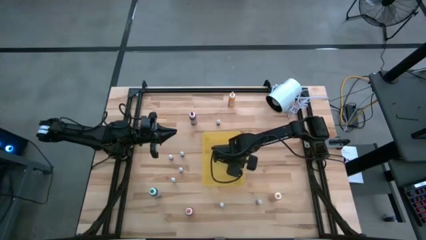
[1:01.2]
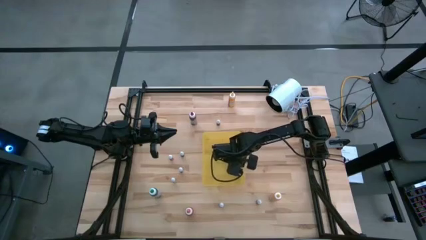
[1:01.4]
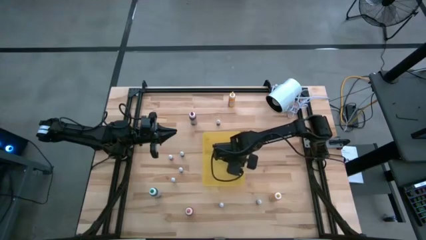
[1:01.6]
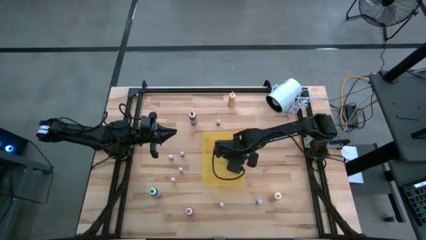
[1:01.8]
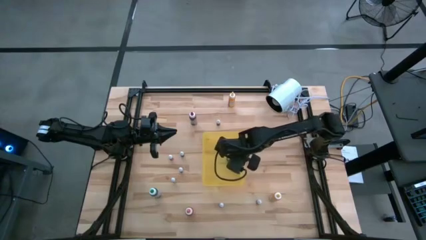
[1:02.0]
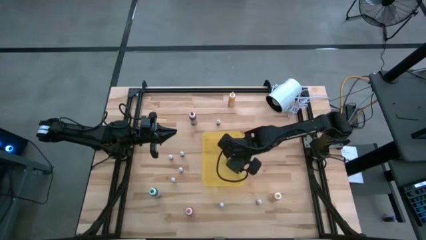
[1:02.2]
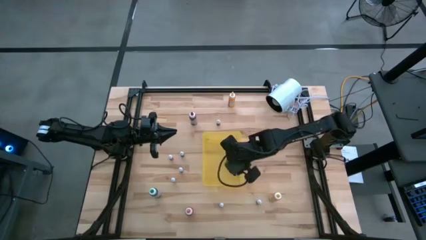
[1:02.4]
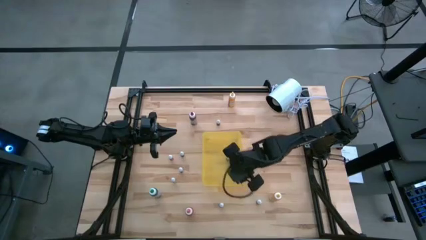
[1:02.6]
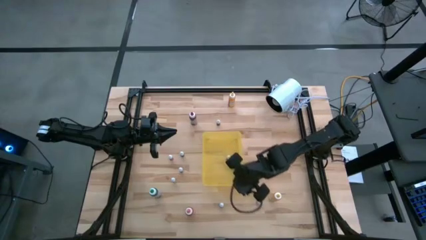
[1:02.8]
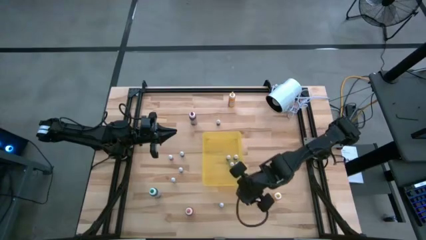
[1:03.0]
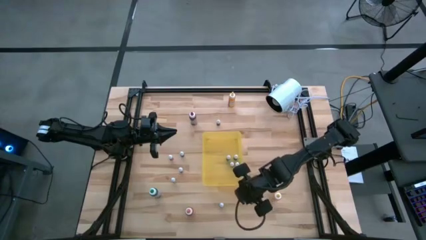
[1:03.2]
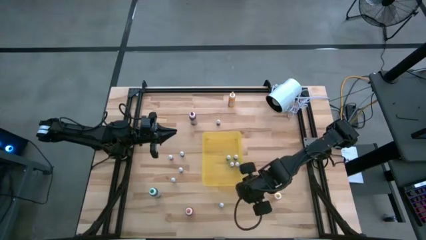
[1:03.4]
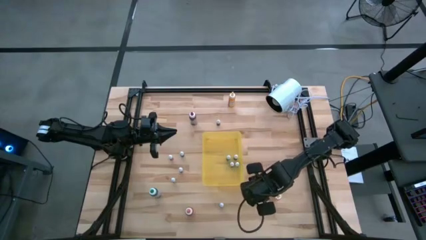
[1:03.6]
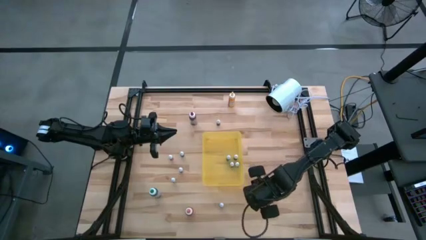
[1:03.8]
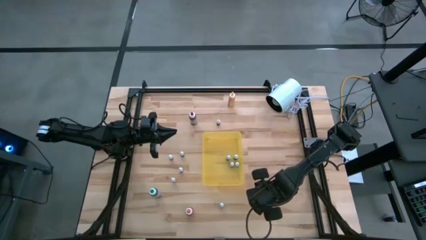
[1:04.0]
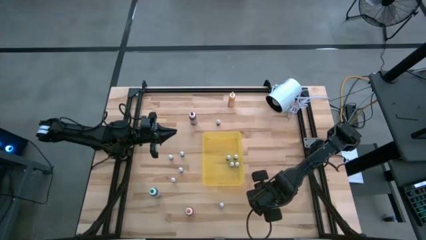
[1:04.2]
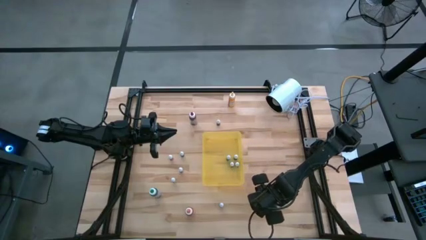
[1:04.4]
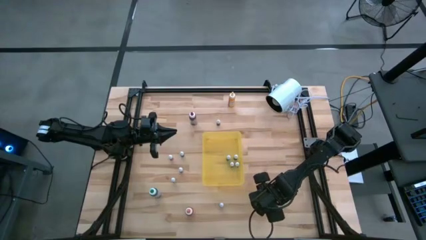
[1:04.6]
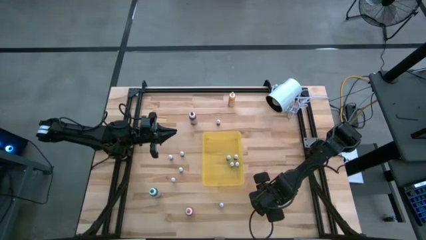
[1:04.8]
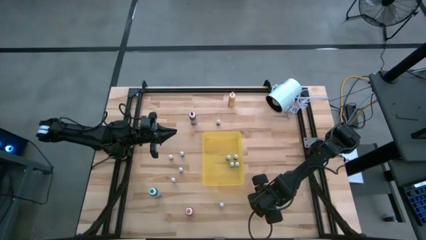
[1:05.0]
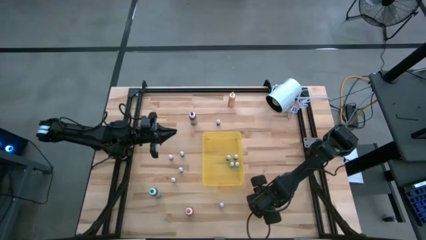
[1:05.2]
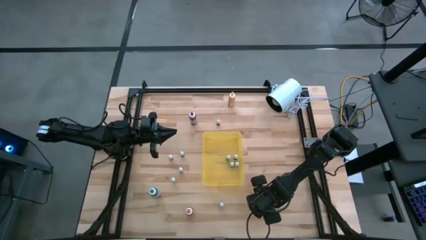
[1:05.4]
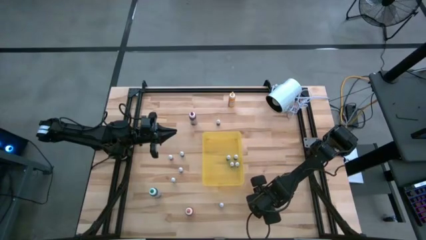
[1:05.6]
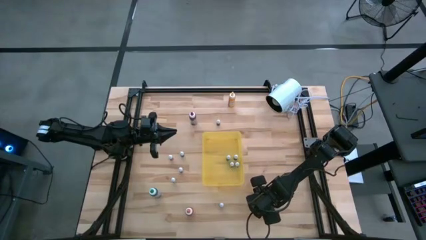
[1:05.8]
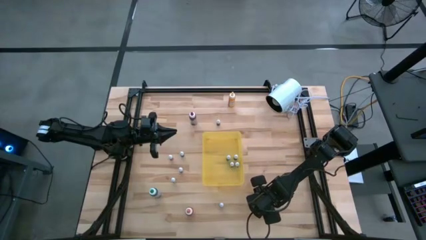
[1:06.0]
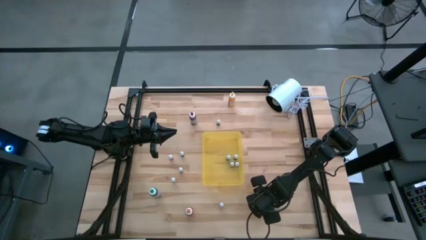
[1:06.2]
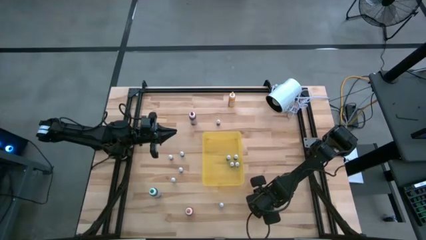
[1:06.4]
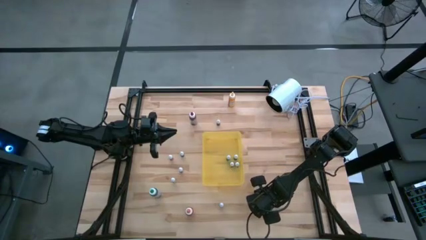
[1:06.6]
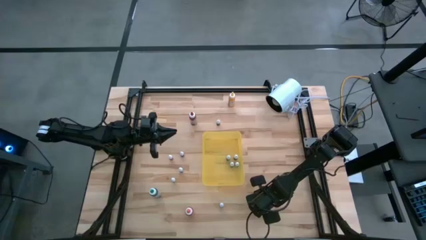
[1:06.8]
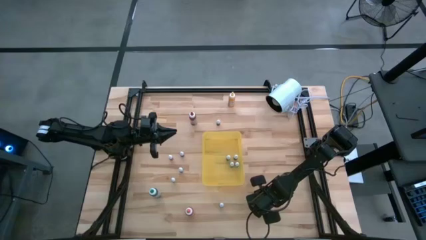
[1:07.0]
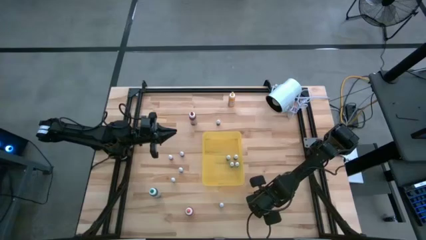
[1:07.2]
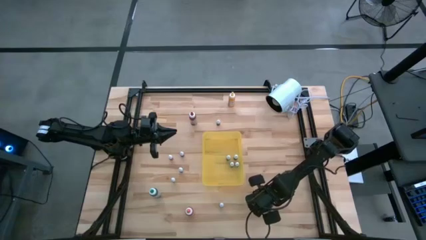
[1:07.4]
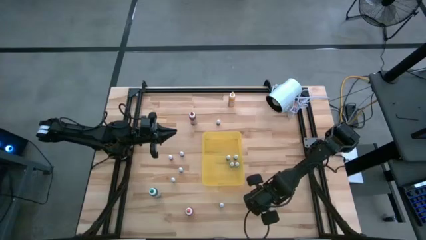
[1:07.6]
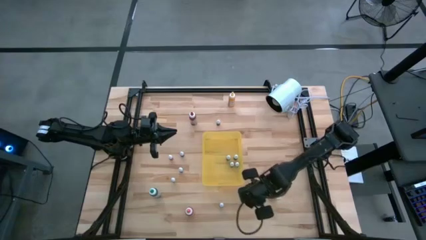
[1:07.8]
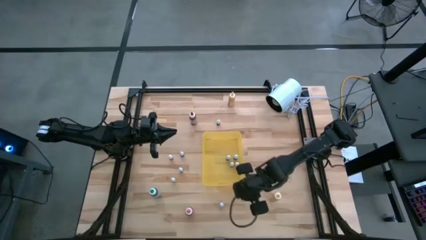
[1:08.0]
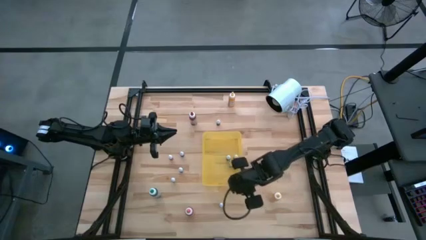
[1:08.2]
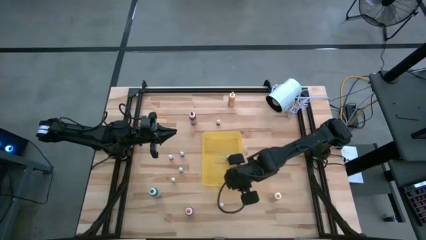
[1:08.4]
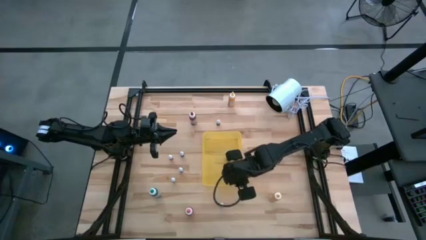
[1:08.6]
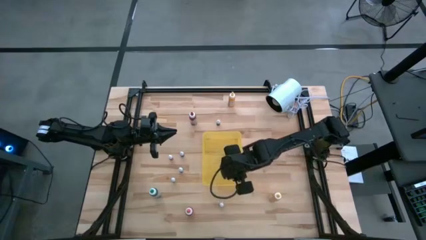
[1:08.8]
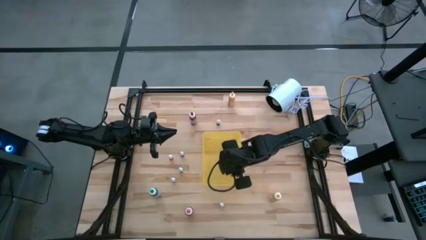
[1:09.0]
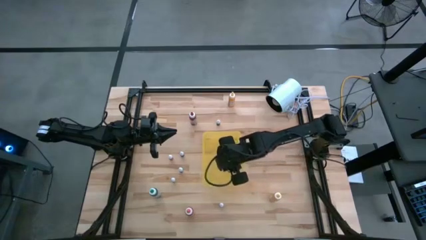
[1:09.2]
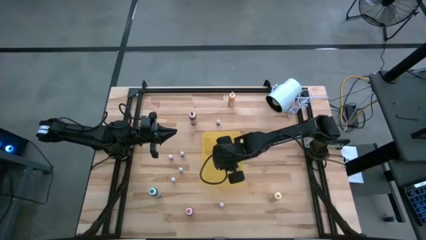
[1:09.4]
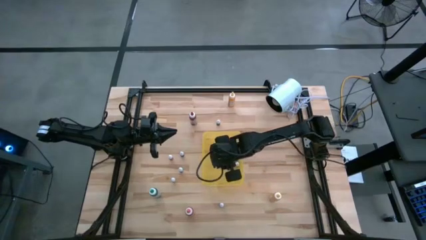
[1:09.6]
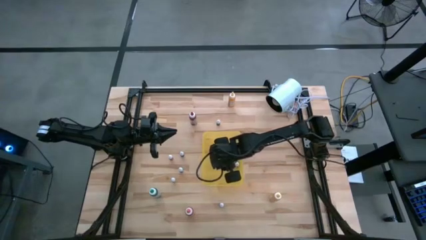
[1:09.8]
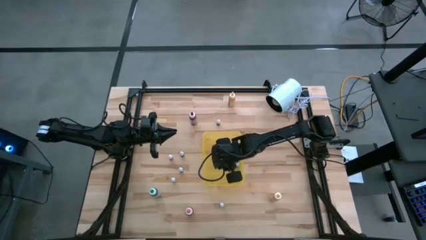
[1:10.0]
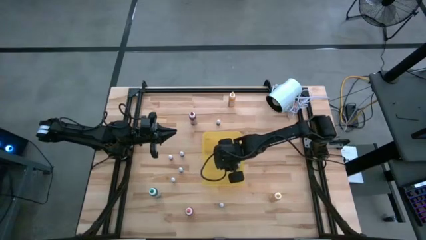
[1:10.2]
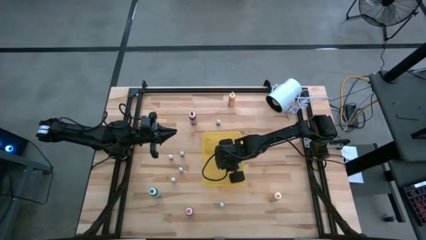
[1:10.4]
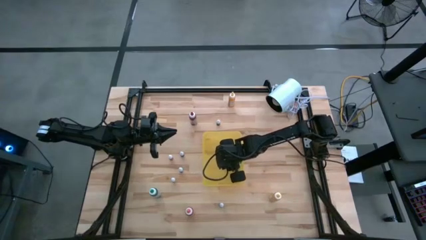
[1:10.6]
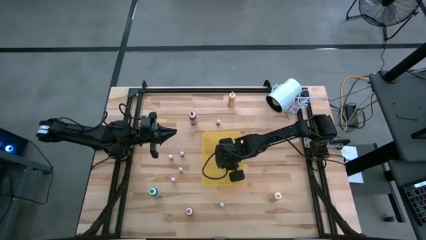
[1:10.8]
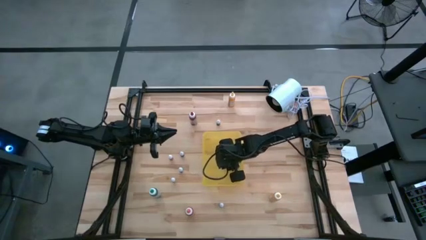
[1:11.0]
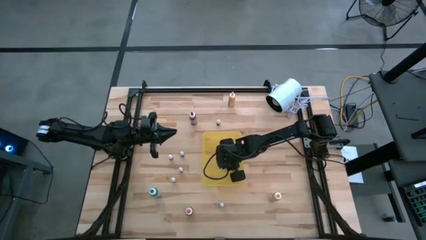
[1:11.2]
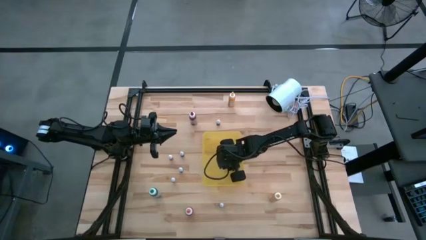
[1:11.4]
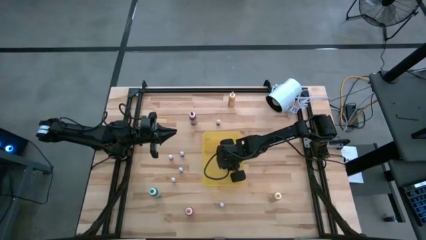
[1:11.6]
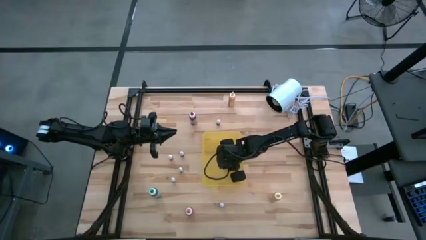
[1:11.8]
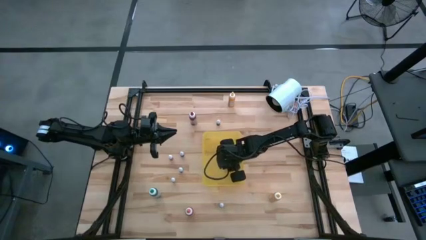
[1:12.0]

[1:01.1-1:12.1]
Task: Pick & Place food coloring
Put the small red food coloring bottle into the yellow bin
